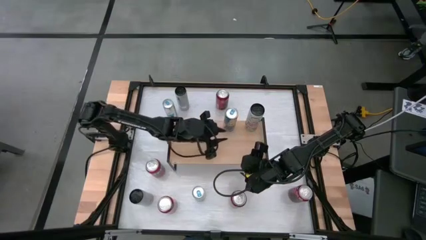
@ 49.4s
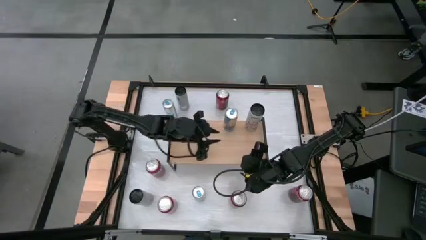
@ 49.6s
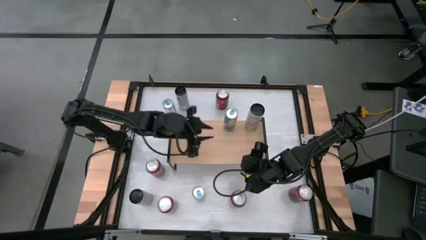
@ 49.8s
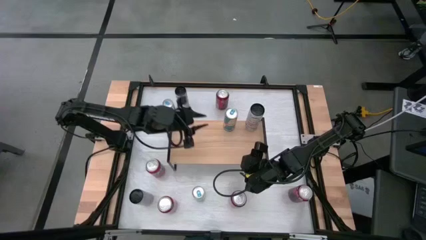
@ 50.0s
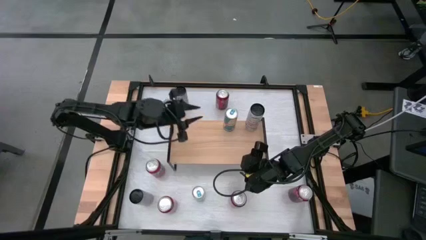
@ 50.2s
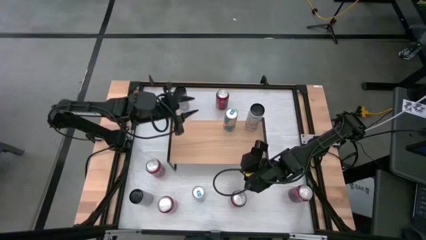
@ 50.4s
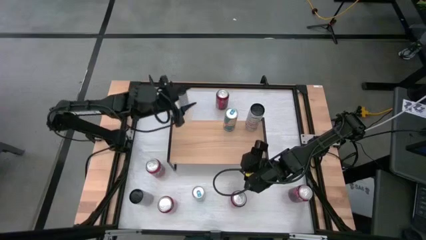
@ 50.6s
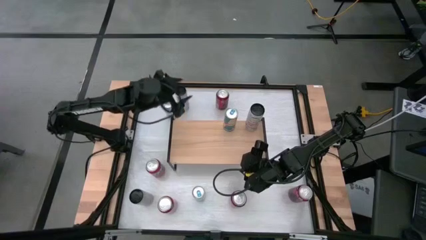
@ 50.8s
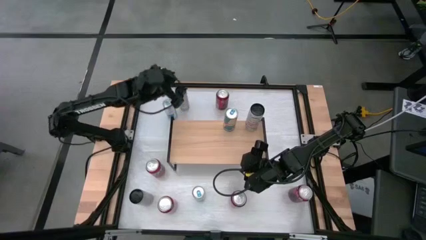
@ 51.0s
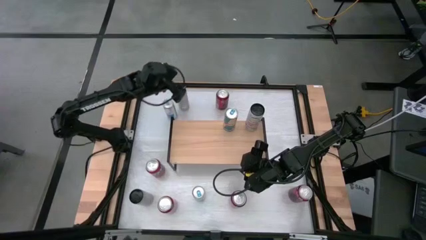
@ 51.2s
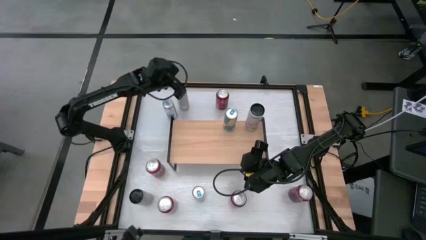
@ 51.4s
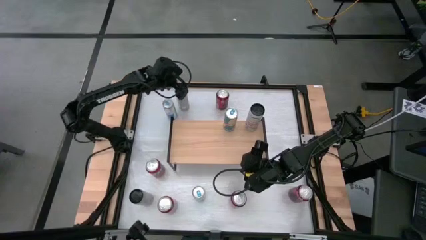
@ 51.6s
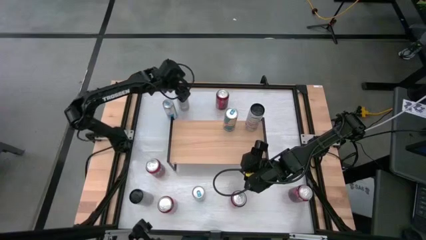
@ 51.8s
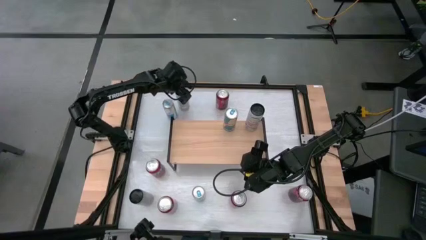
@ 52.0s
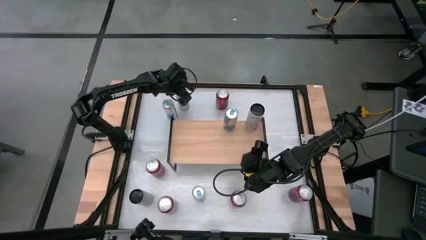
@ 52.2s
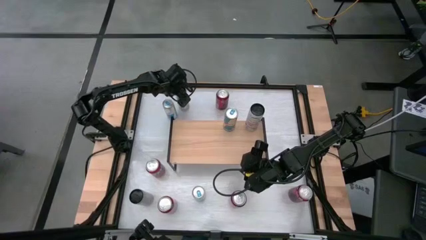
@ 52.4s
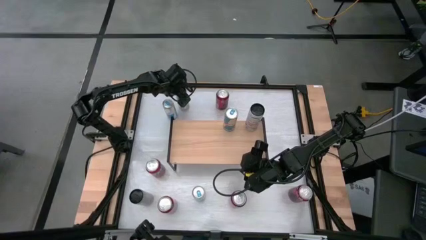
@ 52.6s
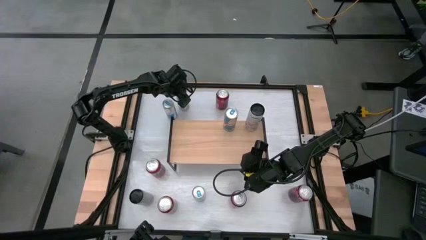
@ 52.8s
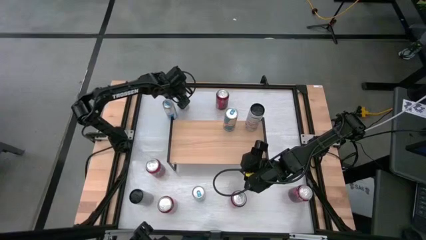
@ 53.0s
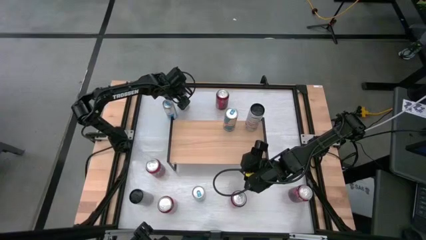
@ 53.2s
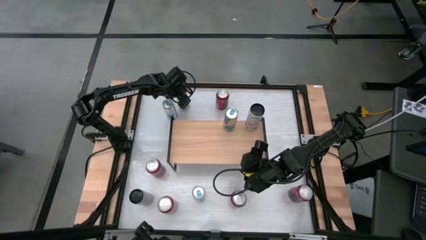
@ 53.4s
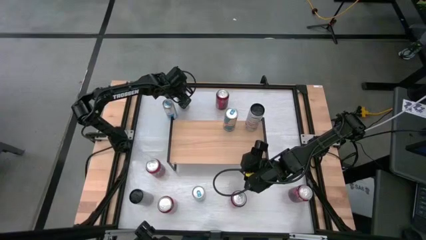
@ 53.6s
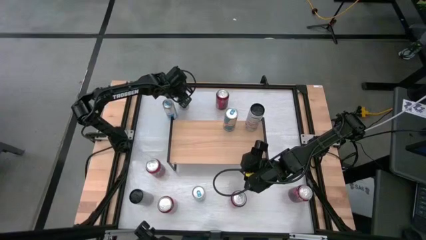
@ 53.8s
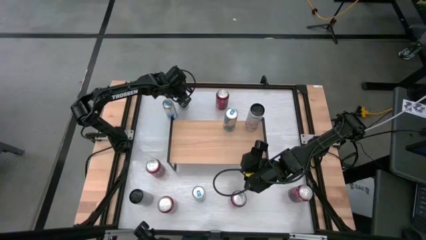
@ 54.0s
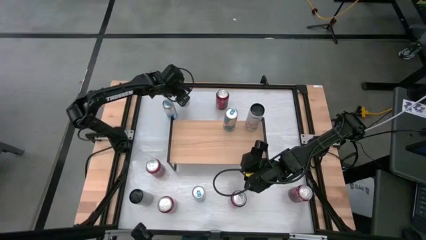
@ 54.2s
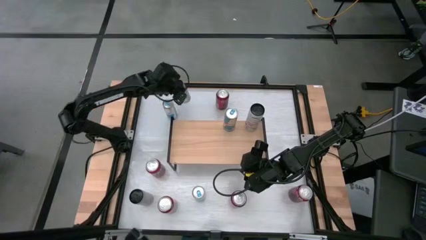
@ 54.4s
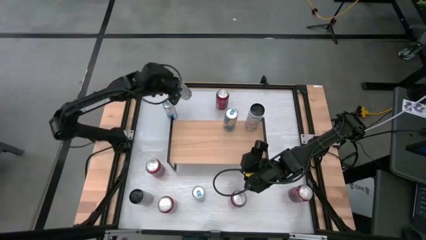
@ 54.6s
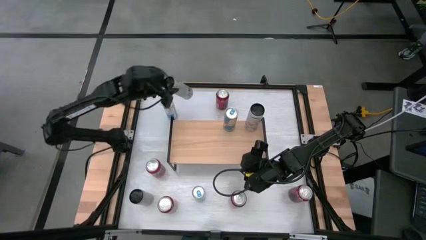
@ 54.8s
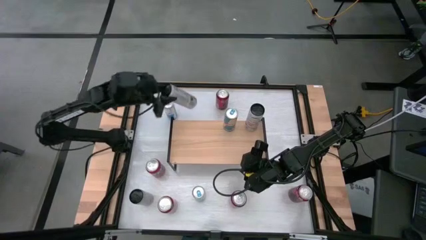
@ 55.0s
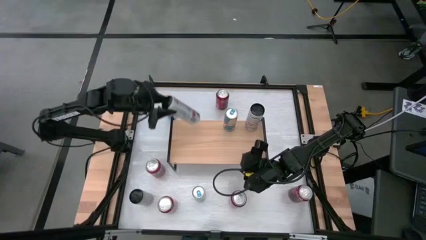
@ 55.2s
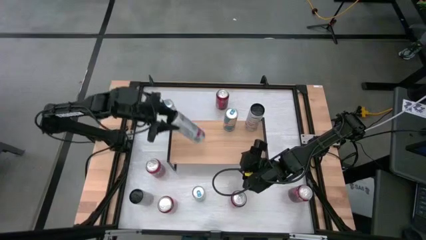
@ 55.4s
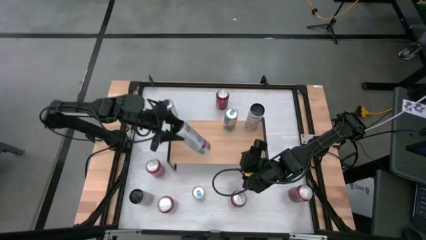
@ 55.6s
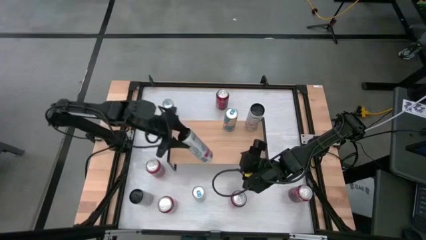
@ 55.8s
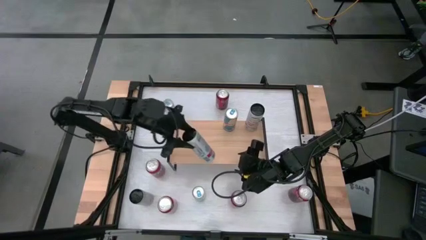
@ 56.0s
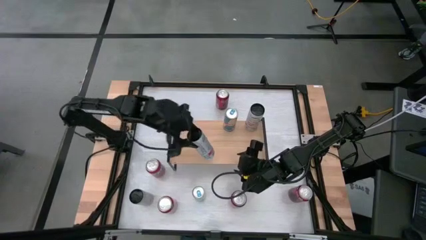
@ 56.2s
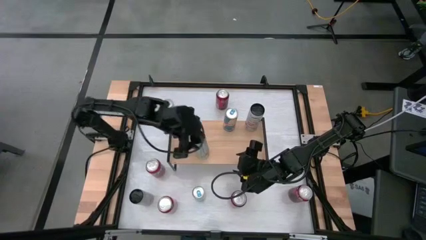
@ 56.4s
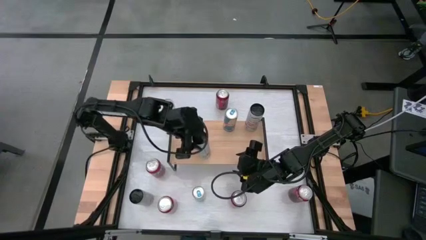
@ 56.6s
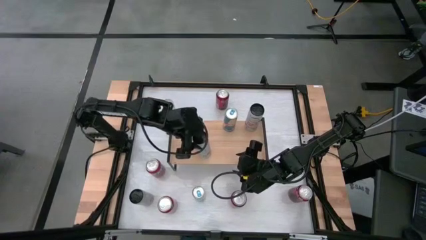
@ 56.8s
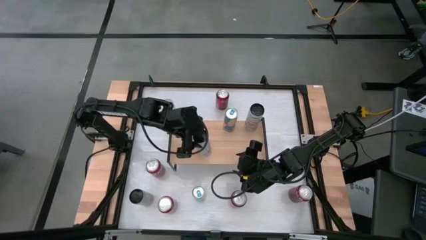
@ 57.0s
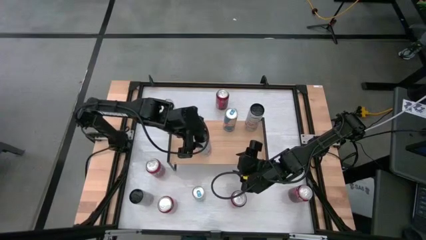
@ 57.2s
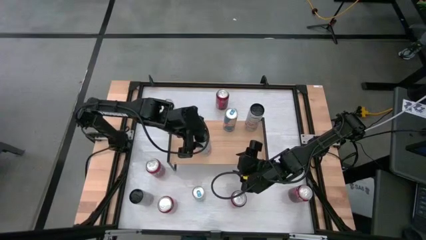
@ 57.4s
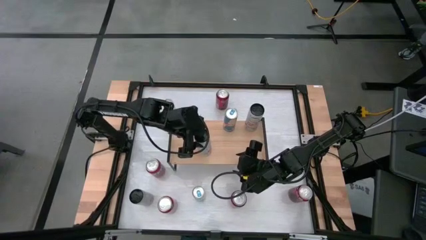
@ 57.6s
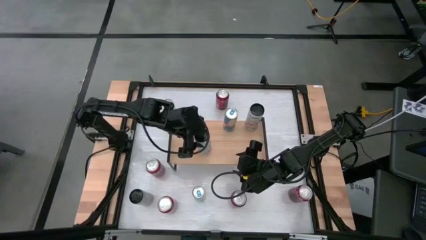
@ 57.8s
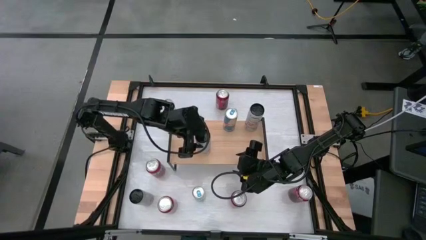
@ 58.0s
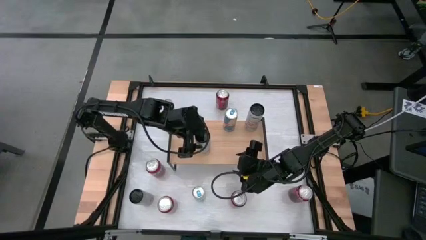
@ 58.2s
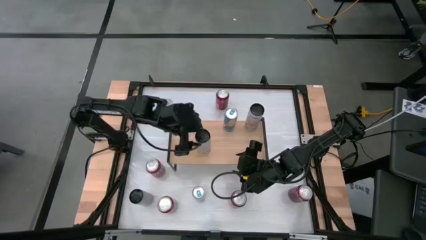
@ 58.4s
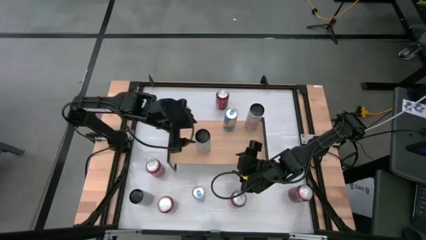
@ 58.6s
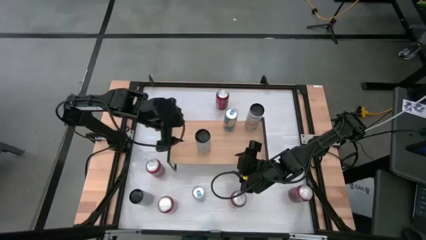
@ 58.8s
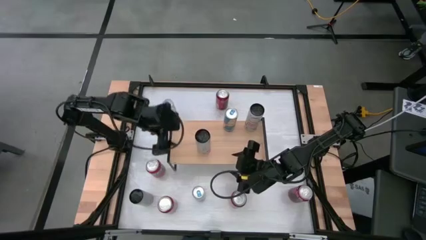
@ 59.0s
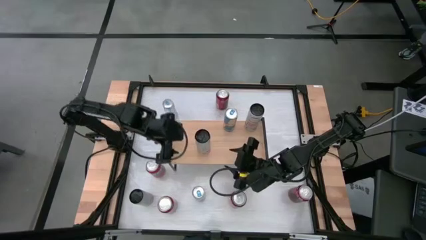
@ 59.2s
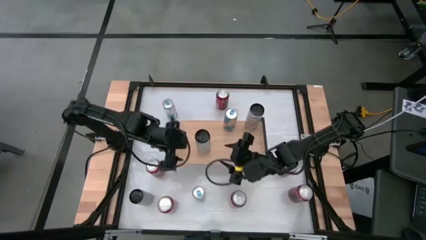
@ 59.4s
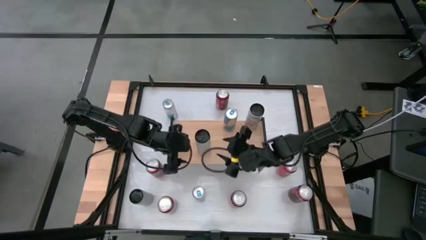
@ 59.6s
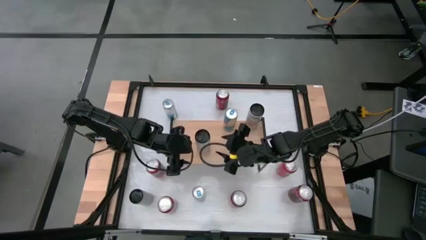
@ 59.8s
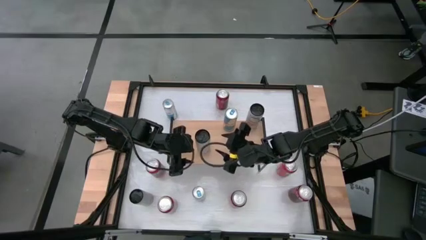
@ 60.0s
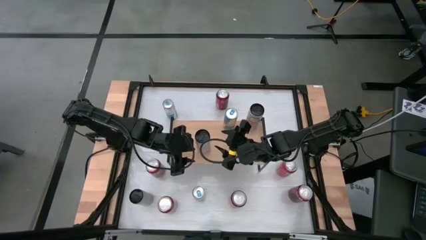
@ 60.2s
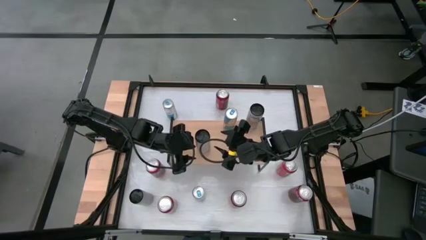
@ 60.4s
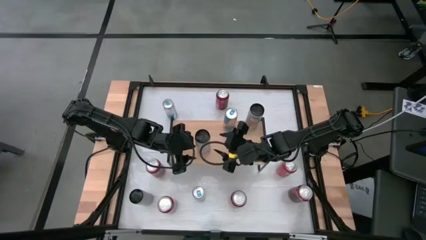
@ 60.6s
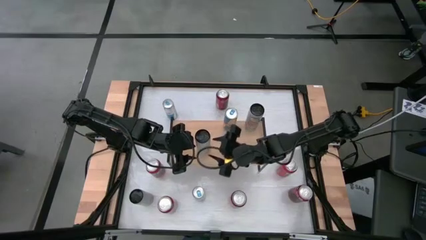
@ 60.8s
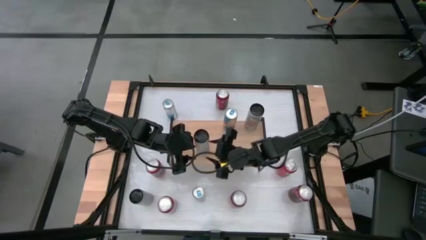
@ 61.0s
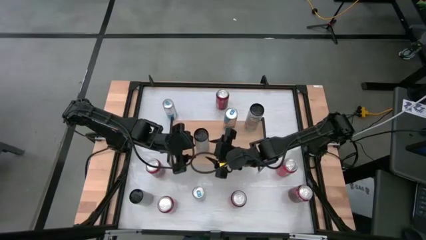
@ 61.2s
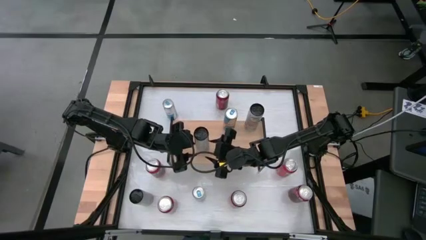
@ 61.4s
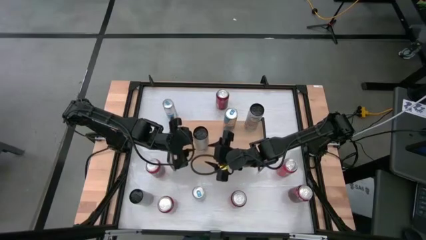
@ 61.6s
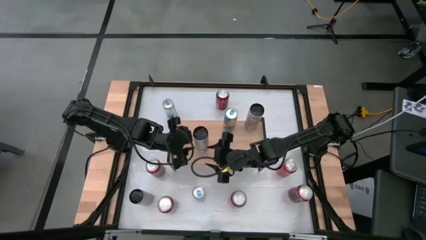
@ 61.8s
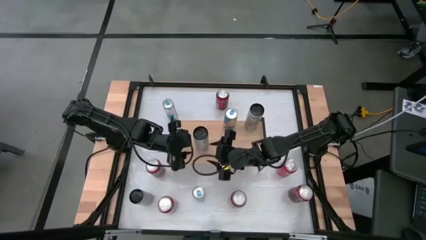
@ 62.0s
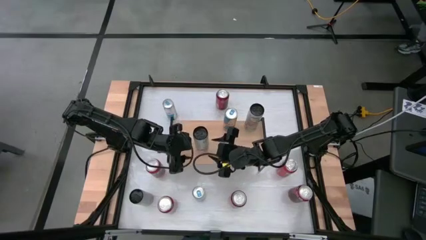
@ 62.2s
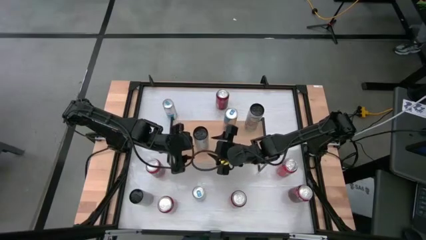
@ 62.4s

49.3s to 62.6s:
Task: Place canned beverage on shelf
Put the top white-pink soda can on the shelf aligned with the other white-pink soda can

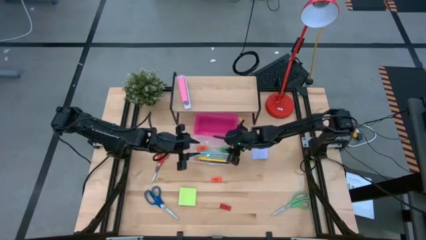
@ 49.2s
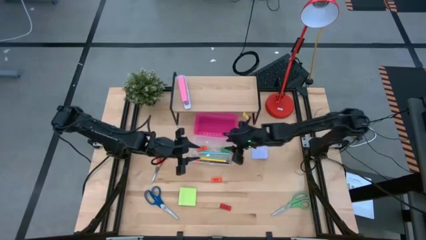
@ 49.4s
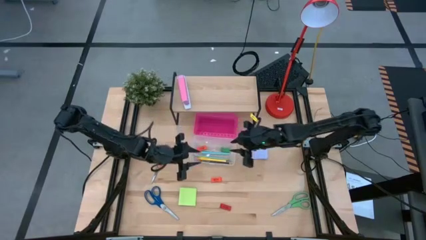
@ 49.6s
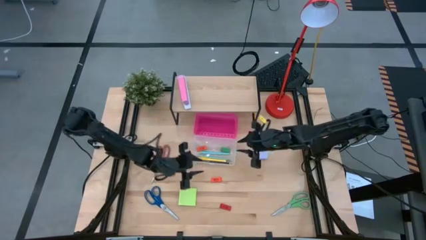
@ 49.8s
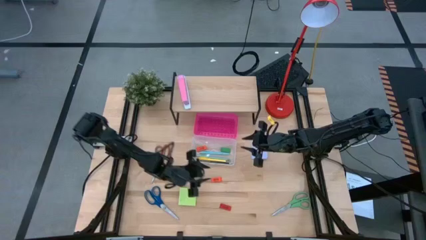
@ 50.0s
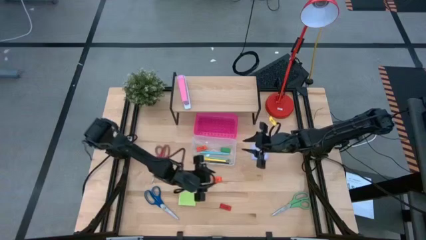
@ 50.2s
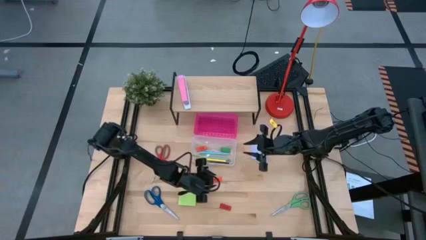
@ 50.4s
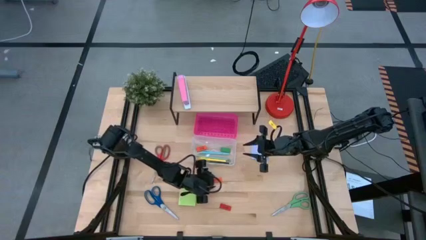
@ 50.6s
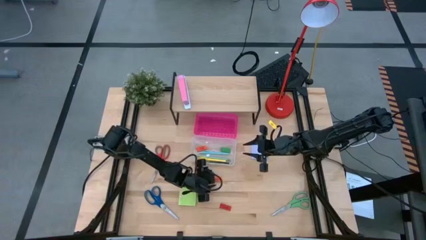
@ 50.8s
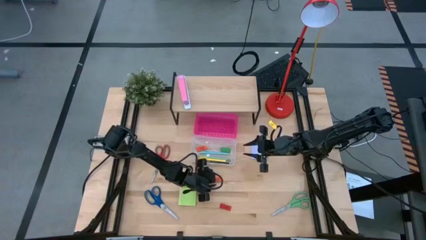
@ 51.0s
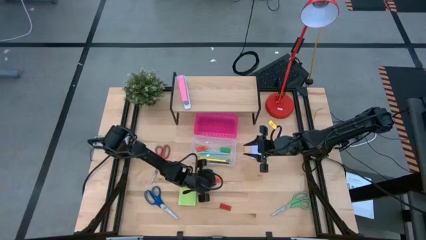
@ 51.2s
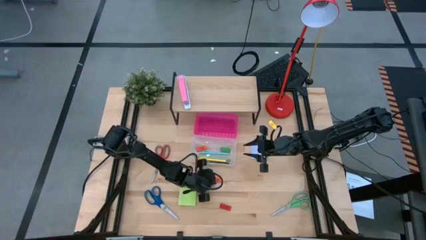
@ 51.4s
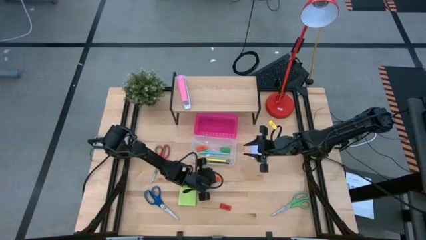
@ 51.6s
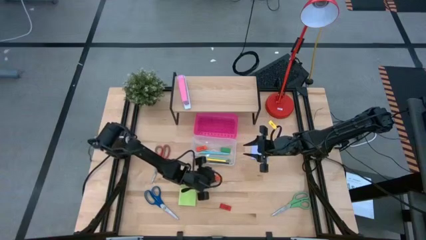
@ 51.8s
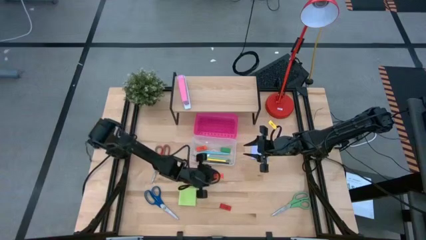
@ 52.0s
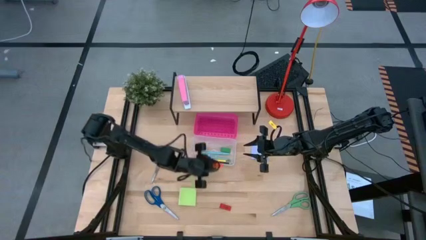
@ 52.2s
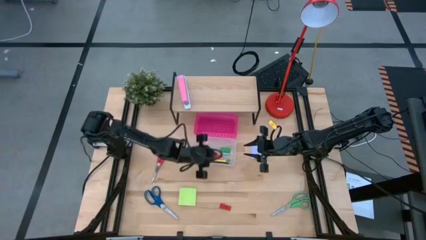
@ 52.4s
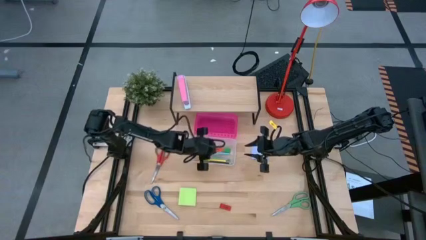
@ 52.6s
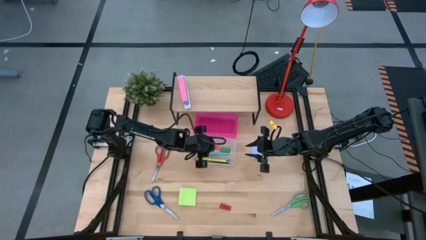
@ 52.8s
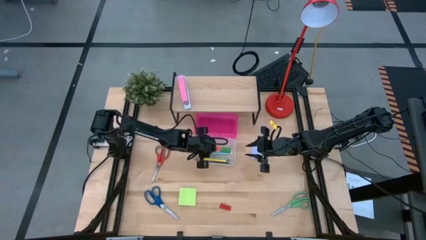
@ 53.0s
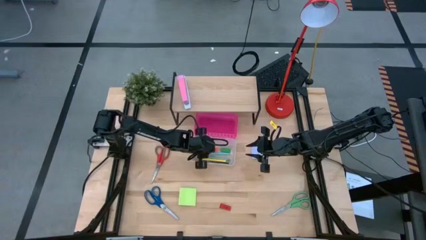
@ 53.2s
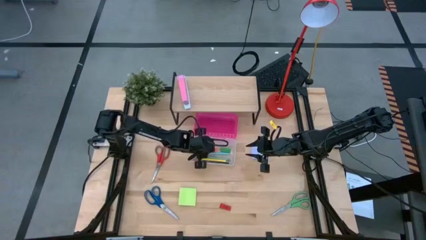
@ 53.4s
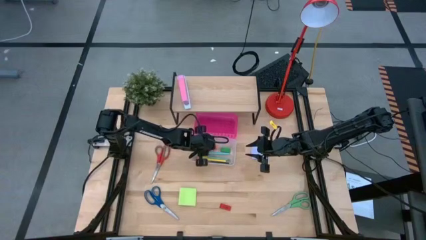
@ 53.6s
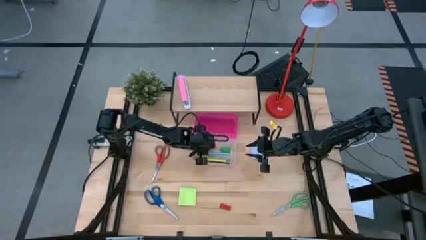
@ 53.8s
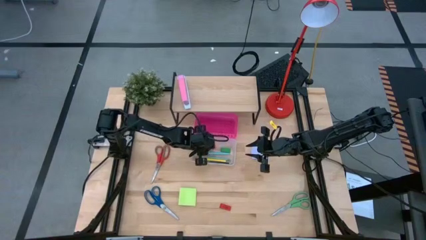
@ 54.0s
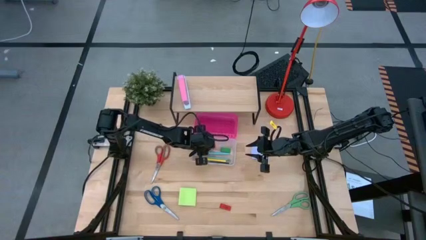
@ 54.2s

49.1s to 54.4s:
Task: Pack school essentials
Put the orange eraser into the supply box
